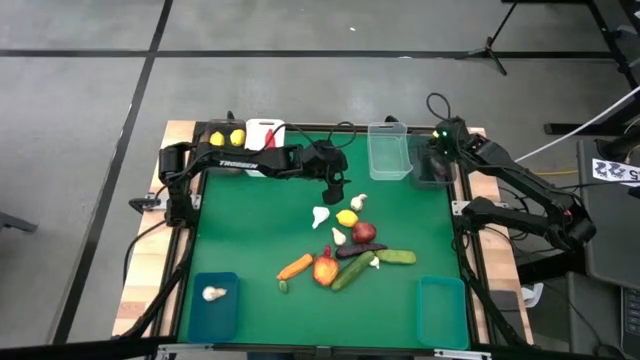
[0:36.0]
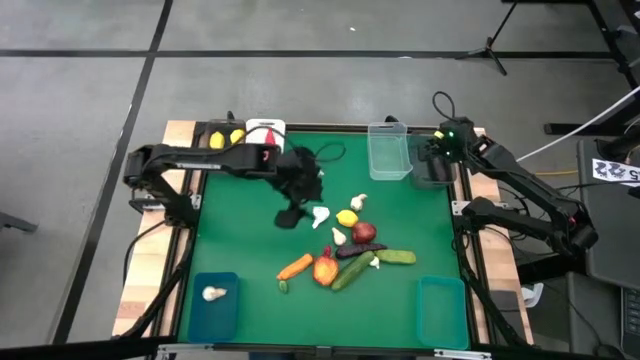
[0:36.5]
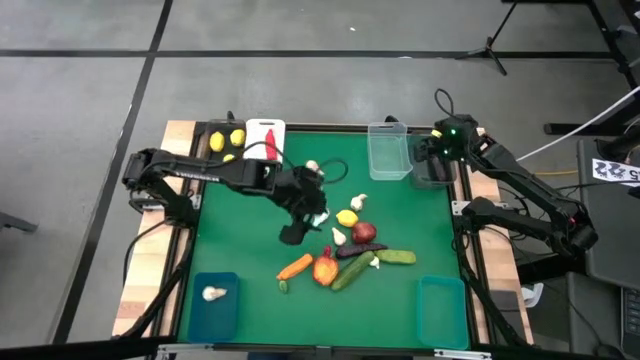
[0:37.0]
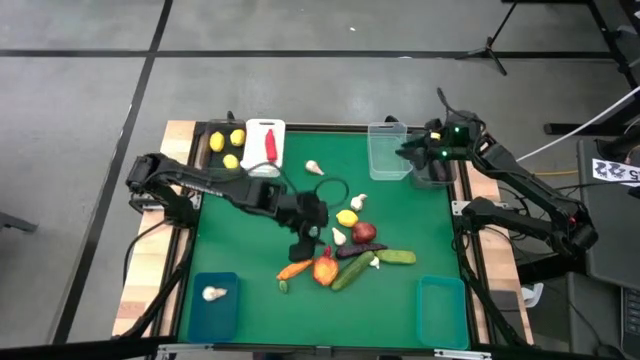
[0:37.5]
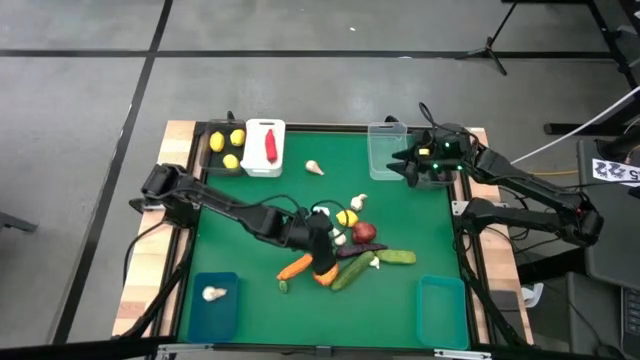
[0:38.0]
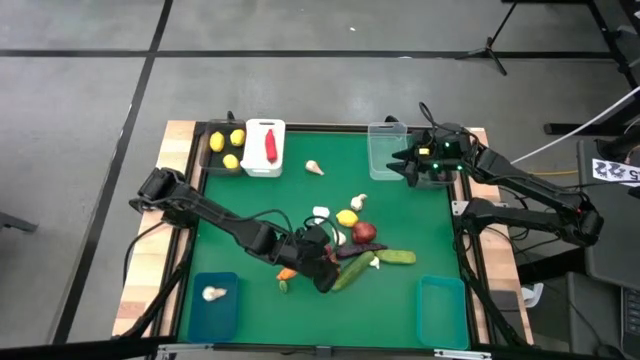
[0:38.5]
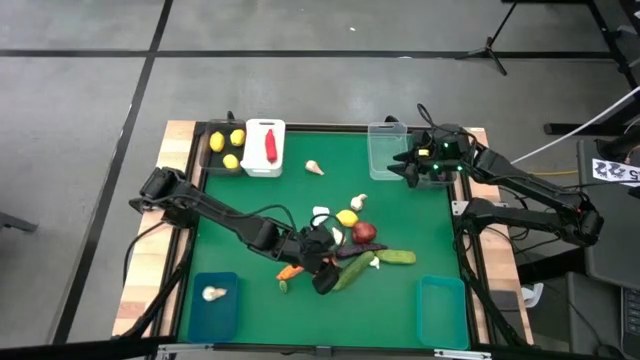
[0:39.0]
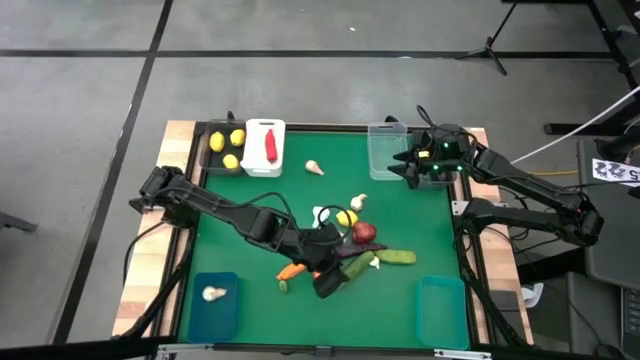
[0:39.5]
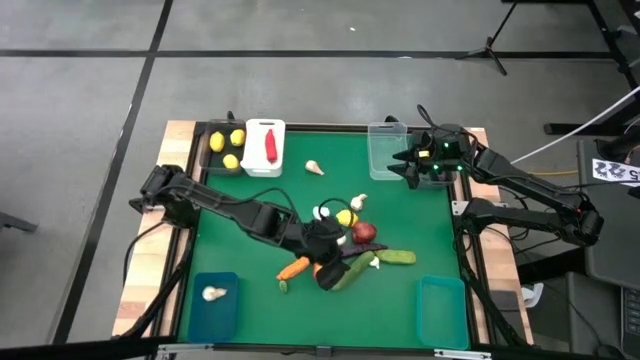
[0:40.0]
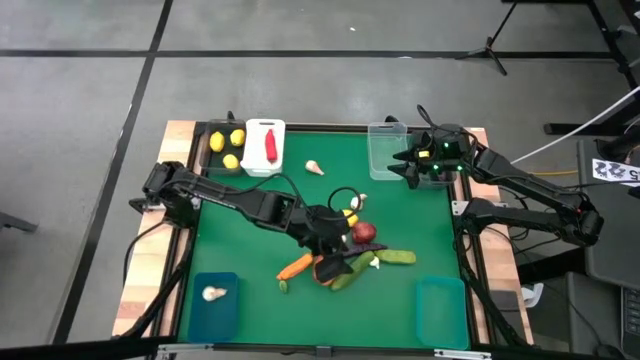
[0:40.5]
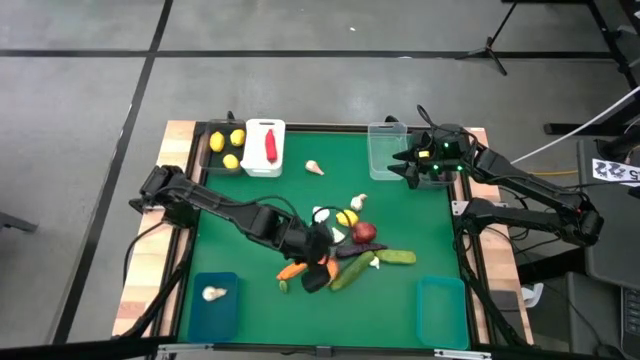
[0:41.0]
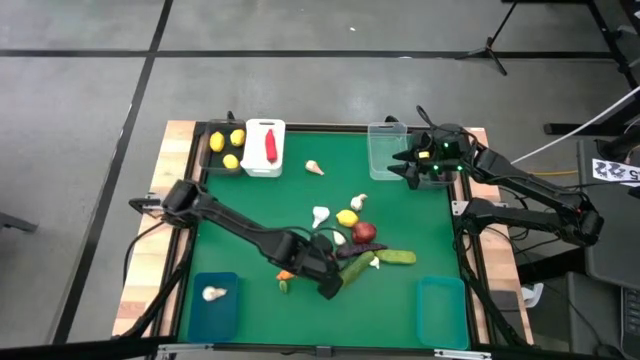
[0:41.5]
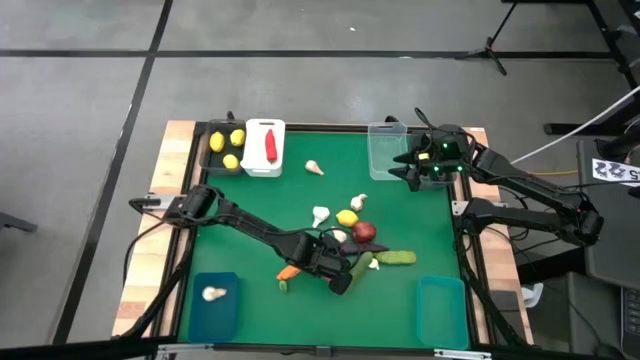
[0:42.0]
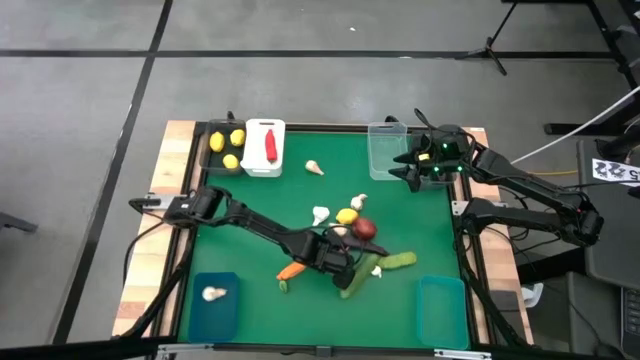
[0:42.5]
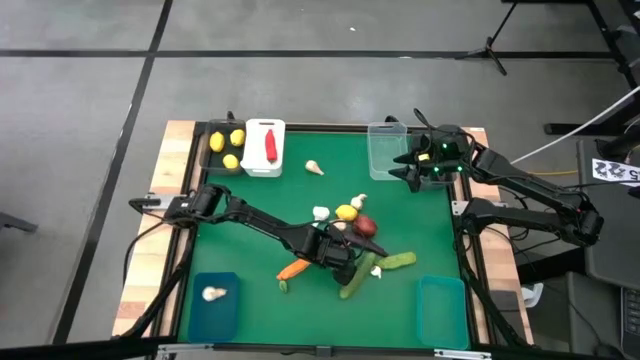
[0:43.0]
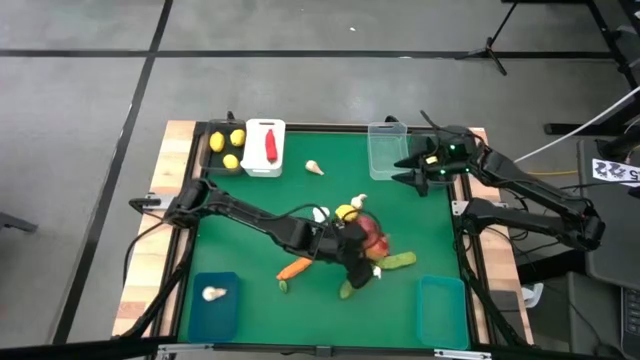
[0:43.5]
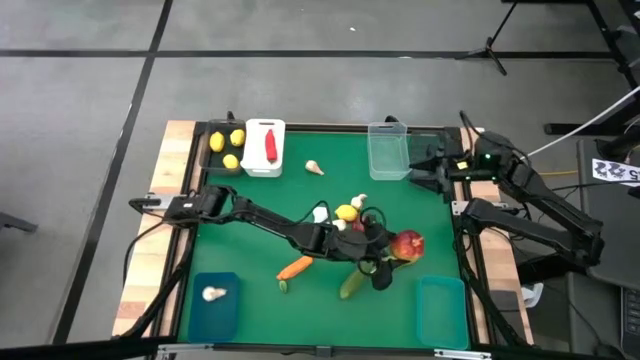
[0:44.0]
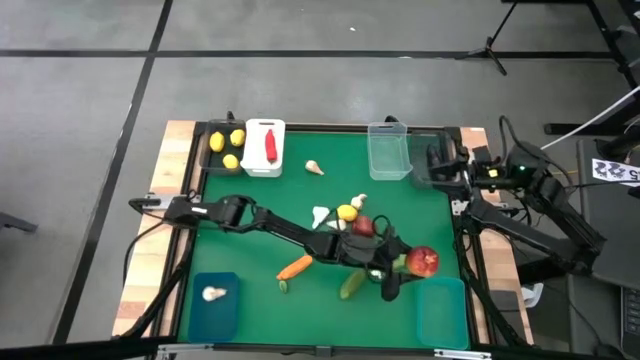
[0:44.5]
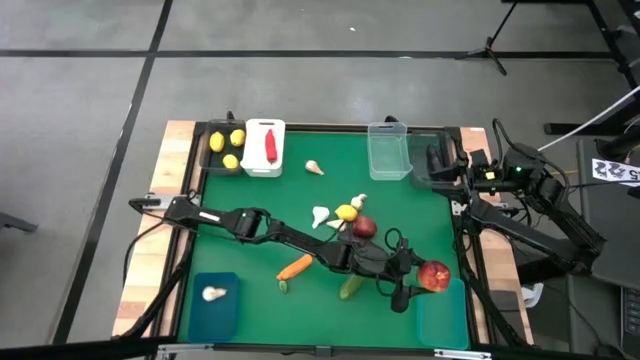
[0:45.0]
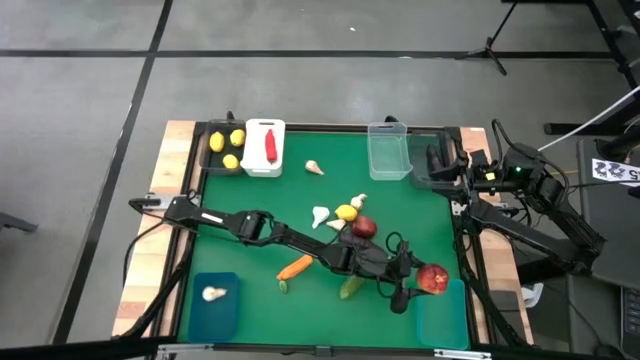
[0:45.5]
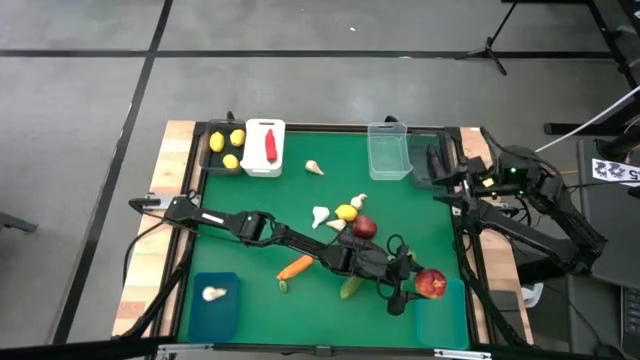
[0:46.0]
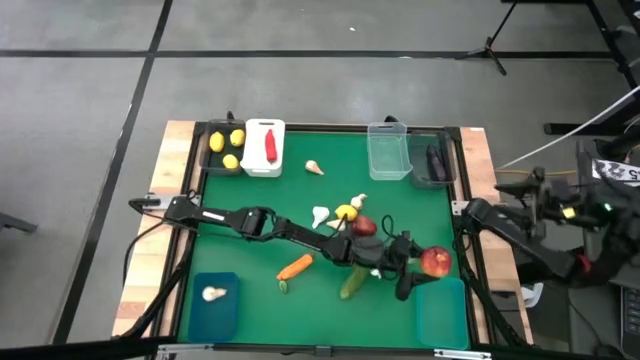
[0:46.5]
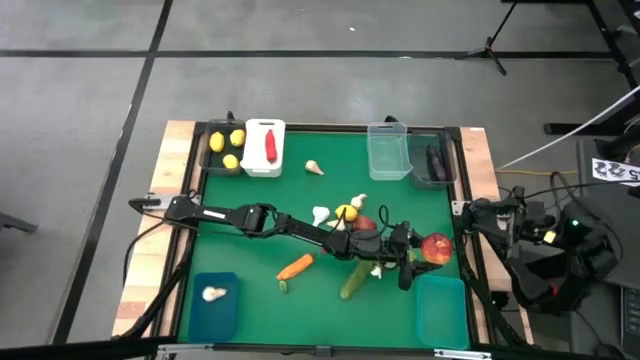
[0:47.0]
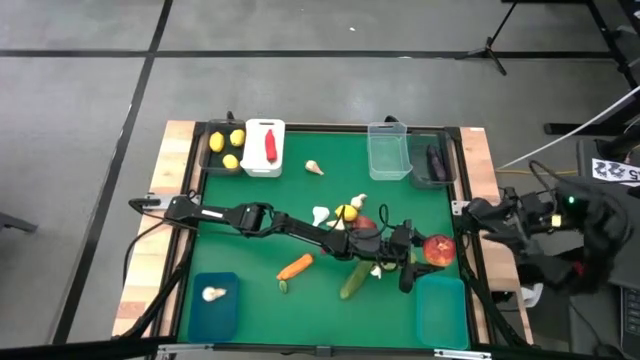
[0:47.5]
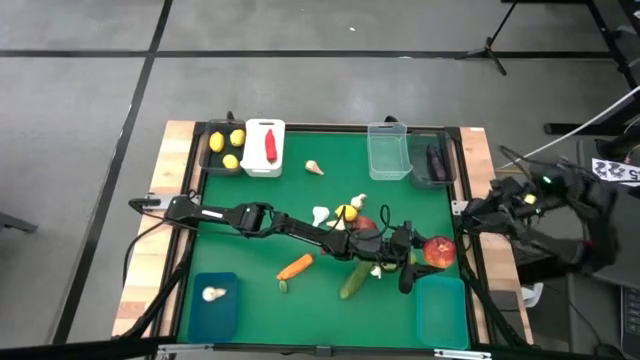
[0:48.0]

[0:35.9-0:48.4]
Task: Sort produce into baskets
Put the apple into the green bin
